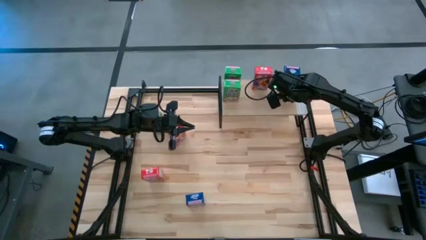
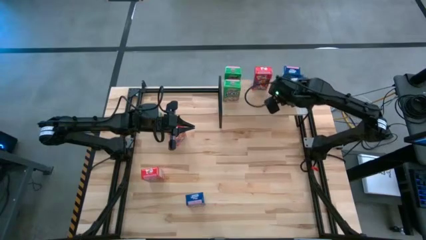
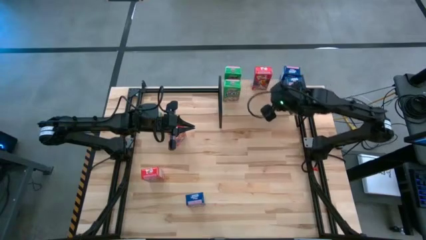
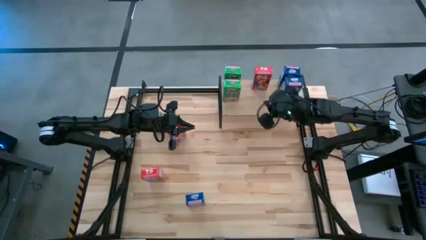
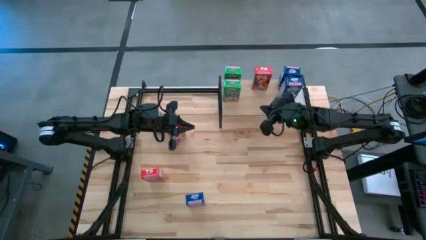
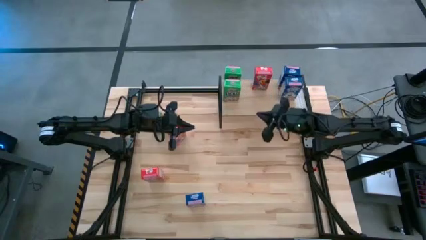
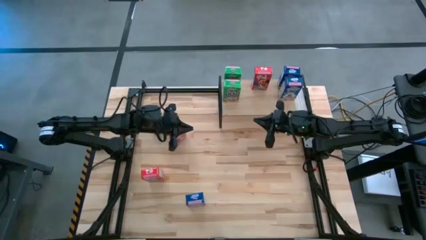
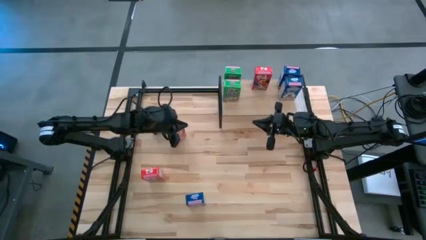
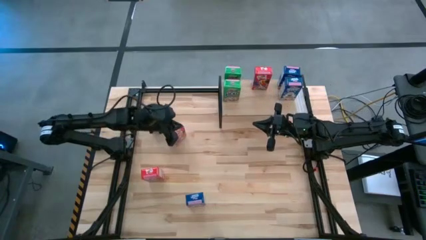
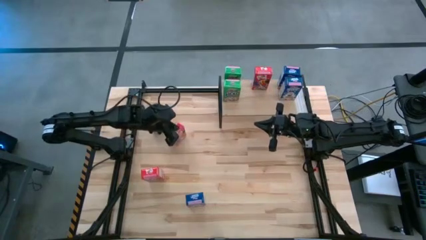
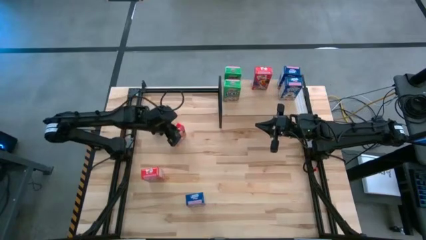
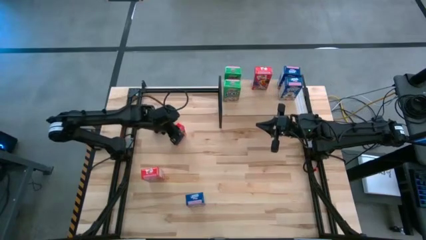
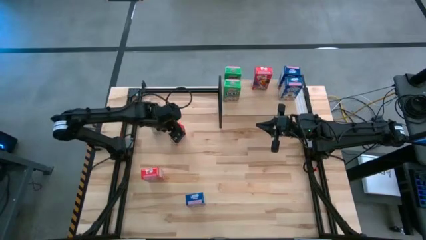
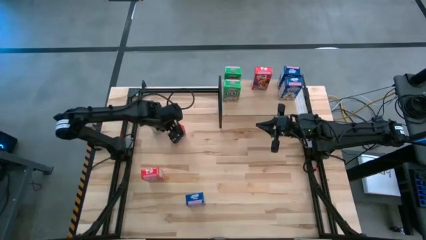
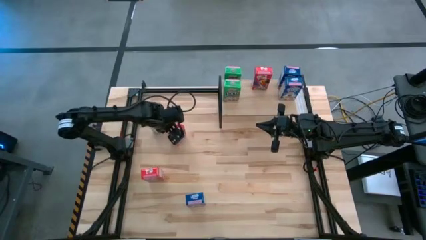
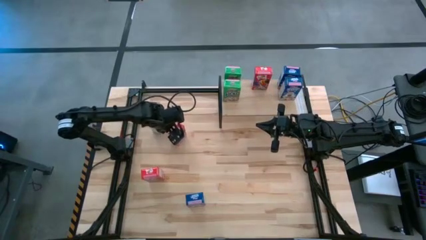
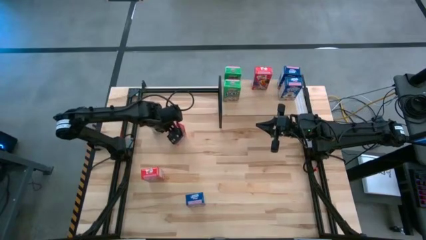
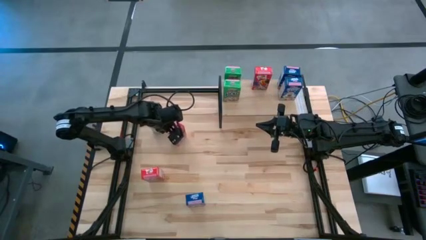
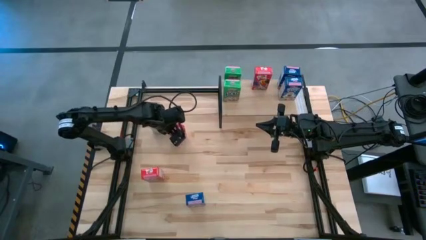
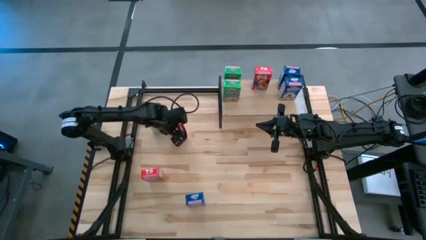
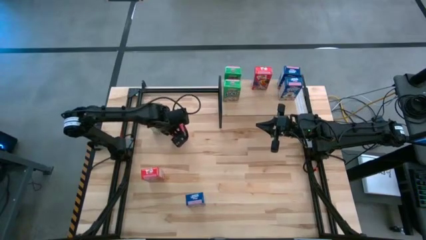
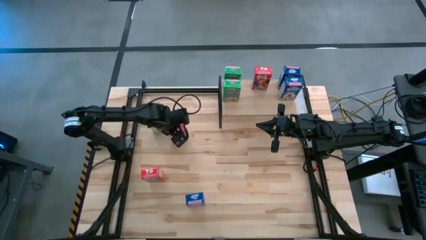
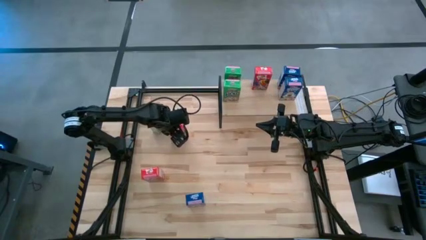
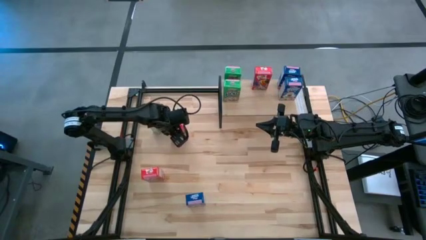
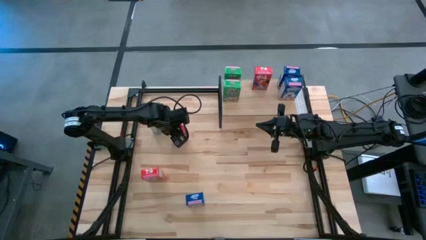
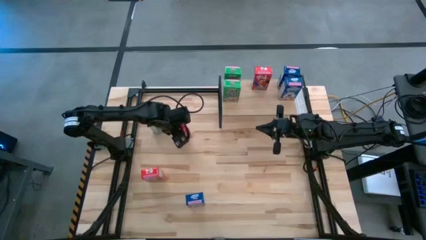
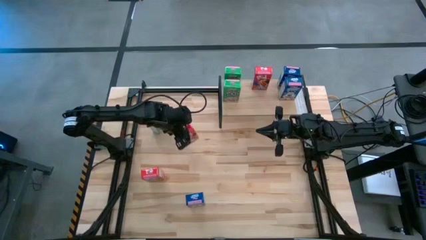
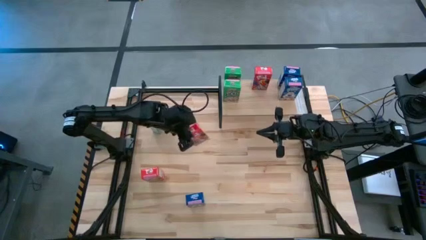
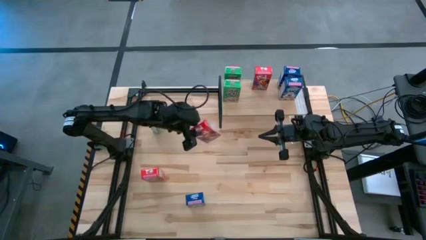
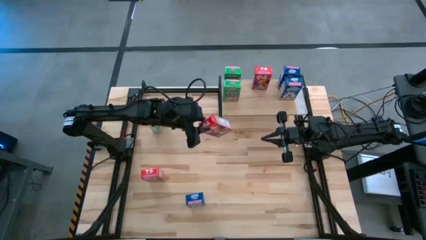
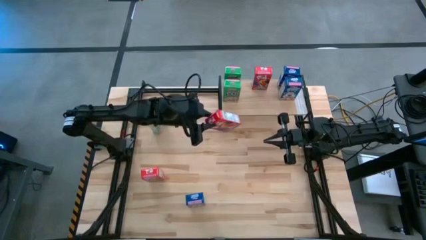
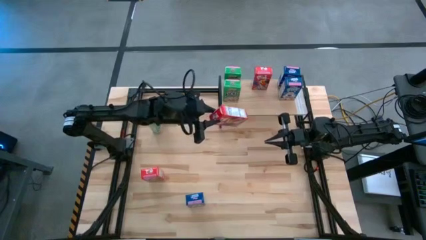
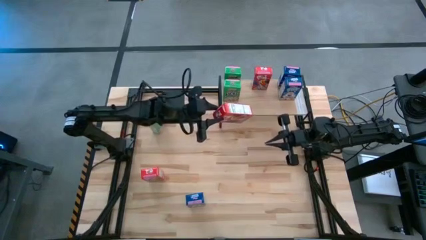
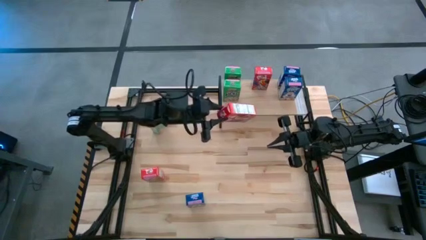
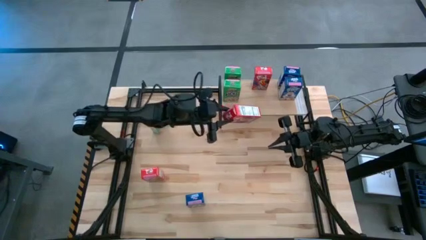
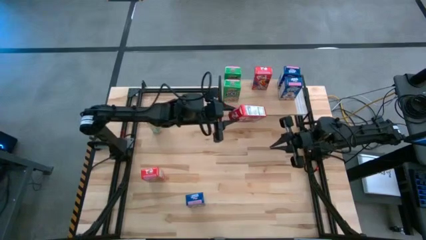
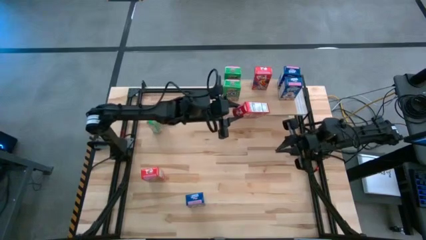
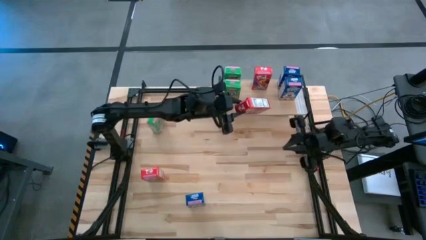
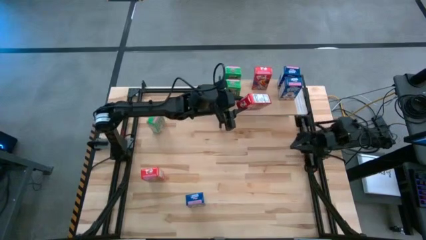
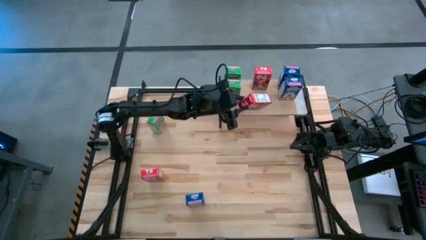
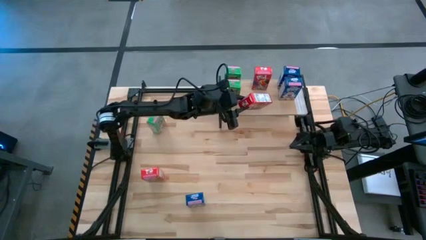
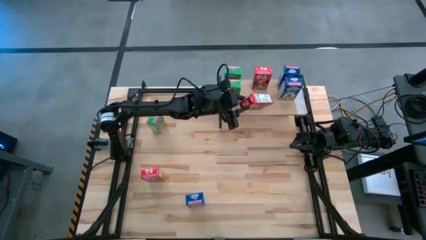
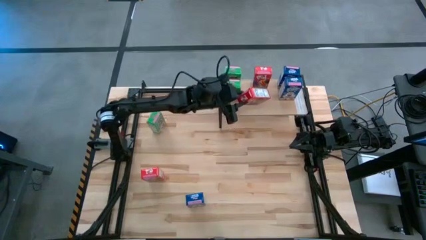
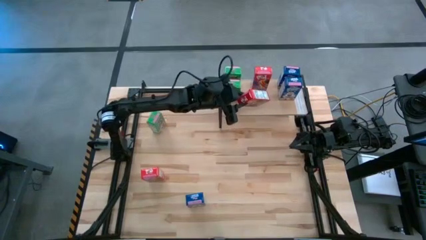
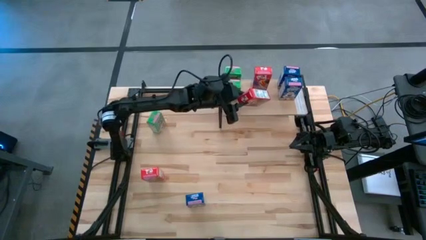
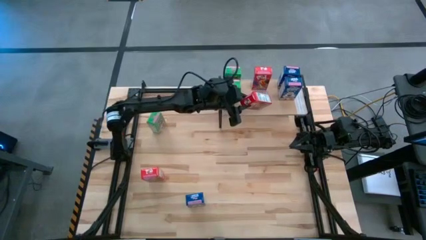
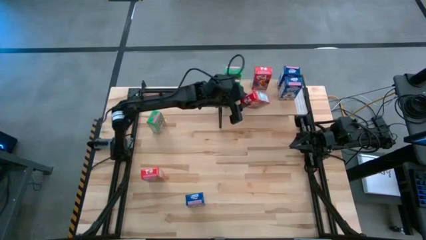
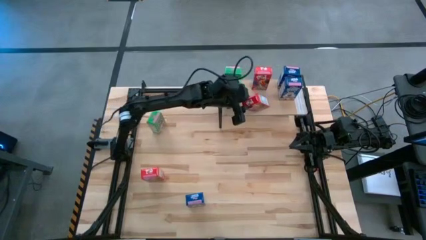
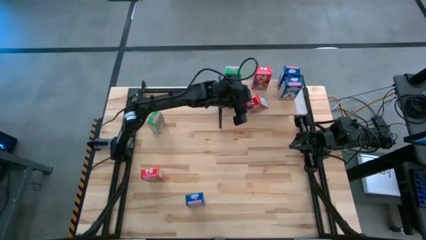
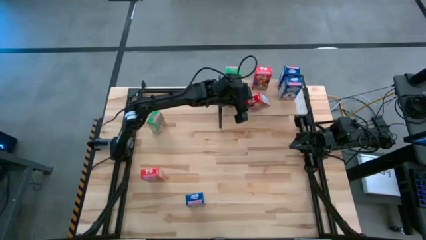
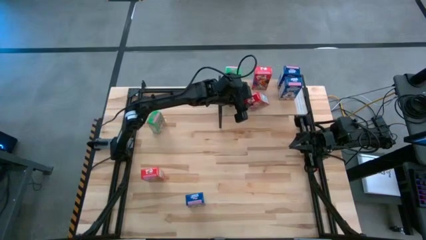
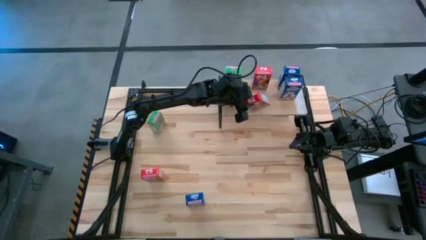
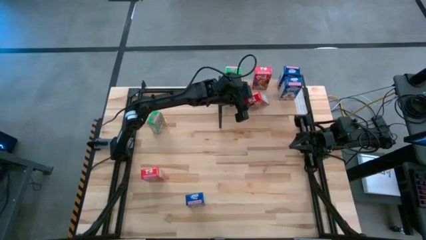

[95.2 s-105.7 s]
Task: Stack cereal on shelf
Put the top red cereal box on the shelf aligned with other red cereal boxes

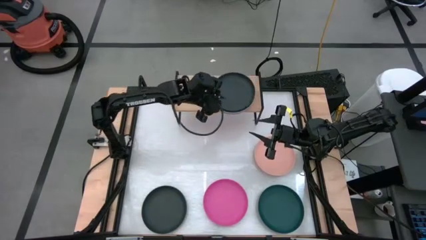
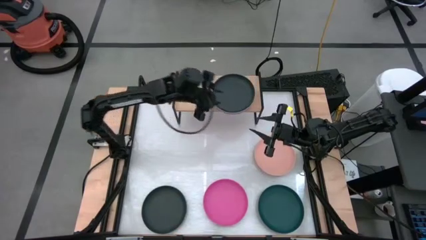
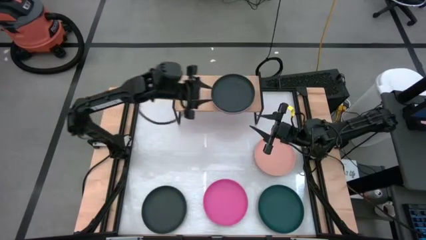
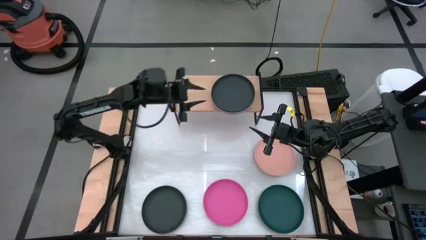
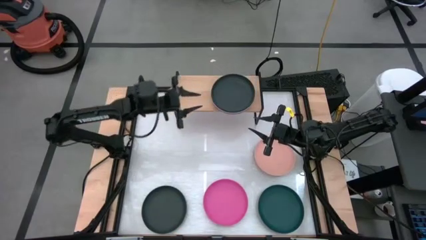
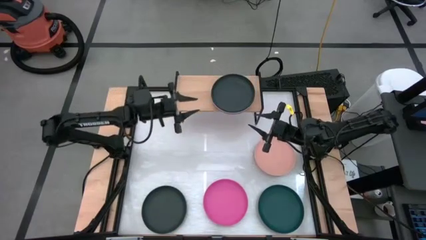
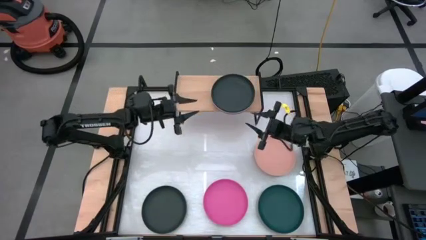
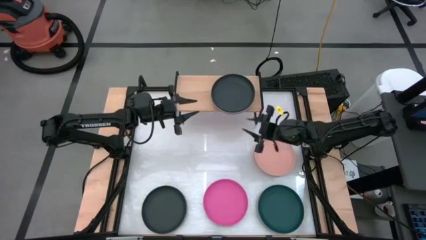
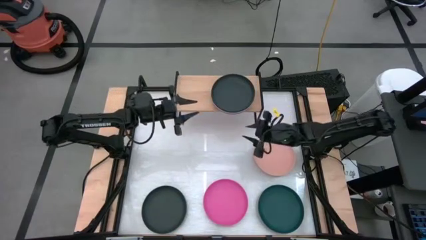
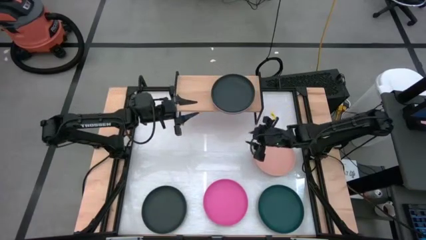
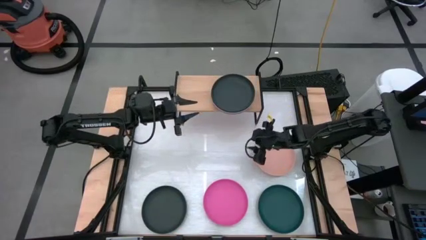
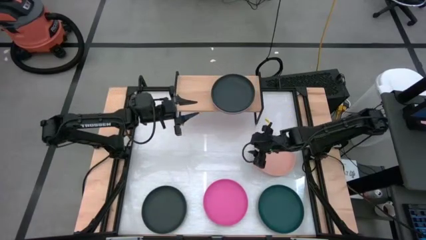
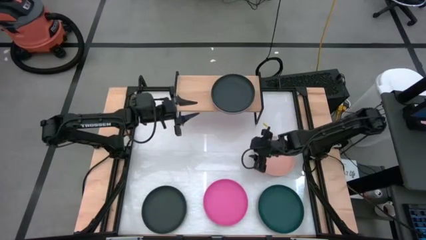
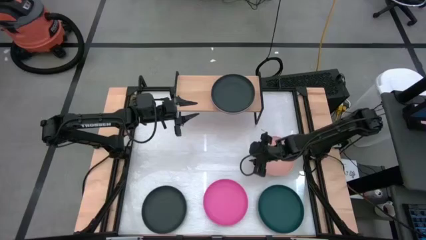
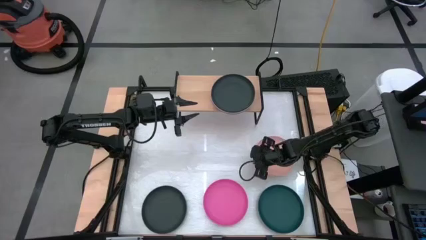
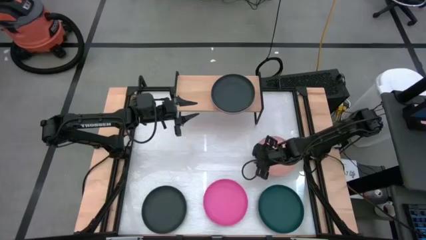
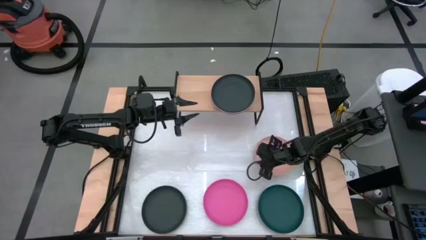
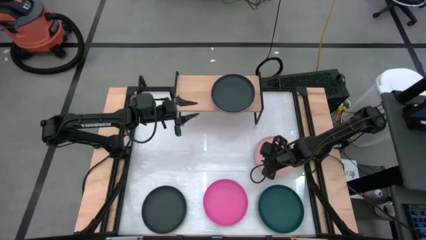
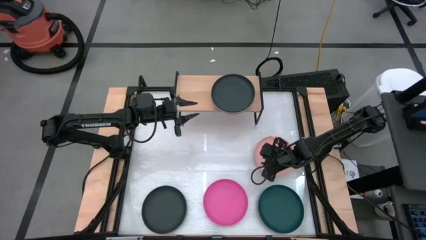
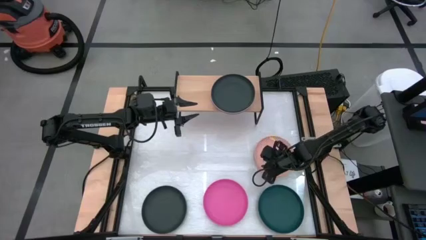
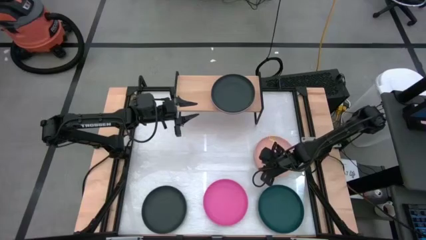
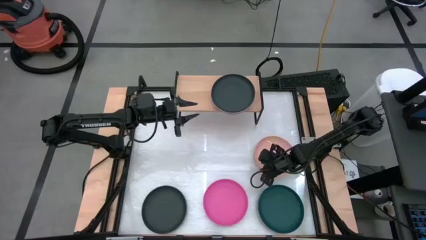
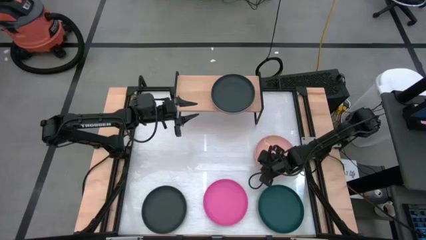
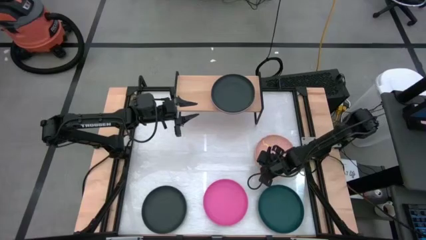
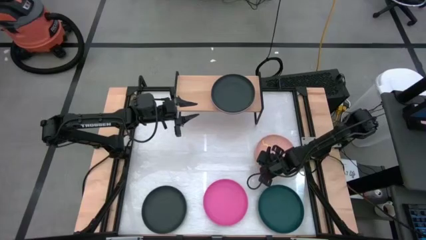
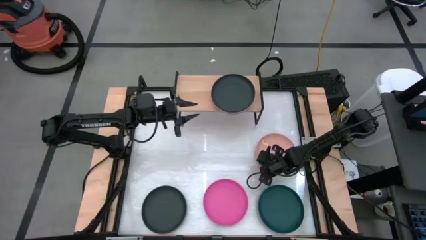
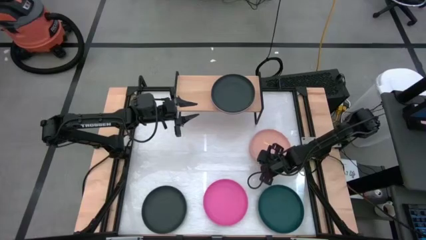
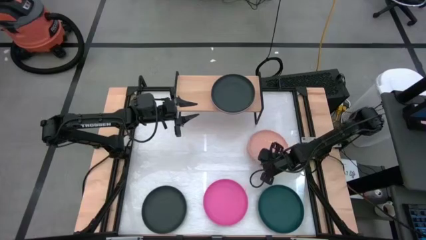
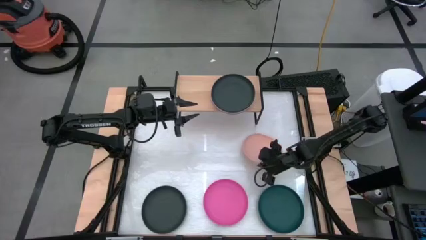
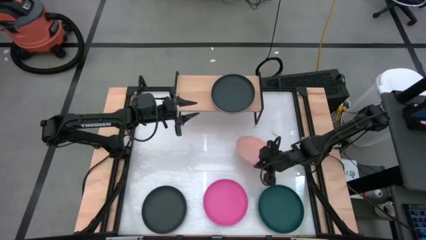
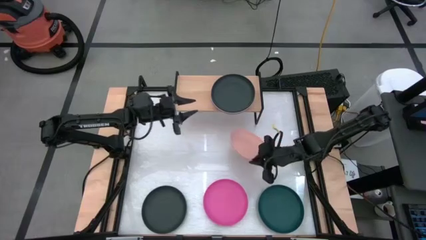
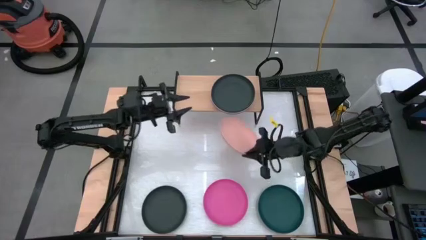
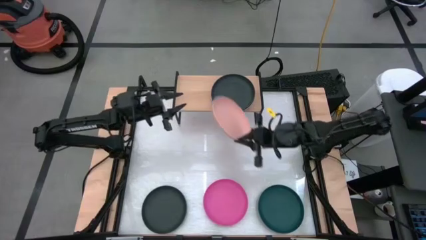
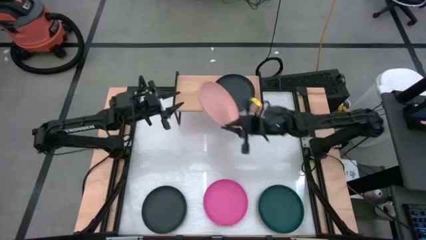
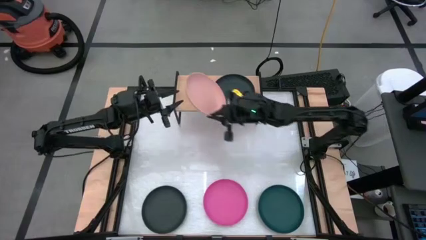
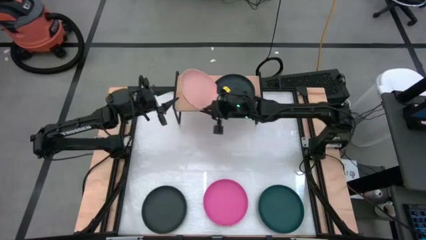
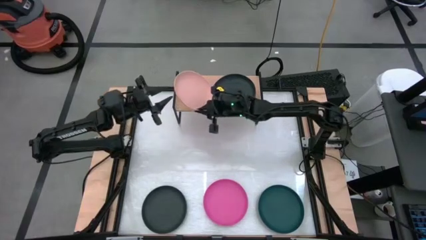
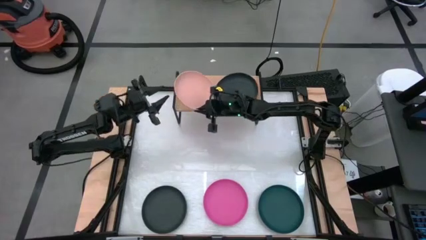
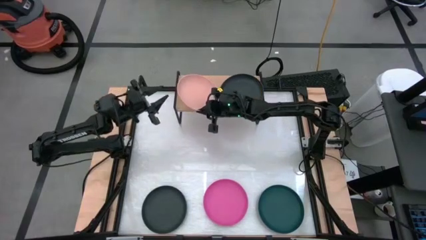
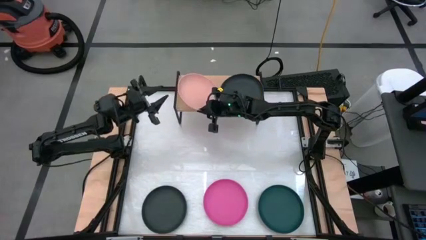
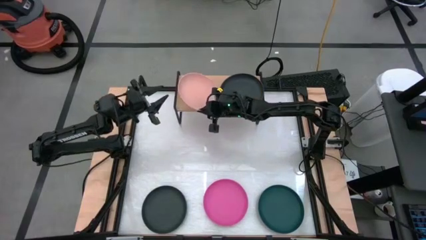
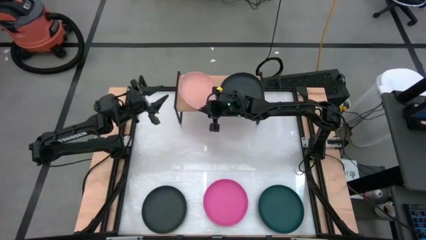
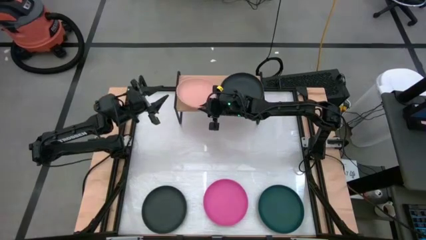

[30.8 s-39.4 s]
Task: Place and stack plates onto a shelf
Put the light orange plate on the shelf
